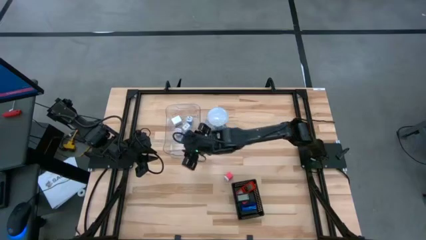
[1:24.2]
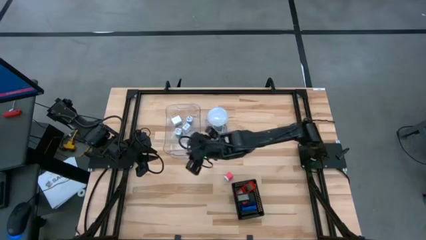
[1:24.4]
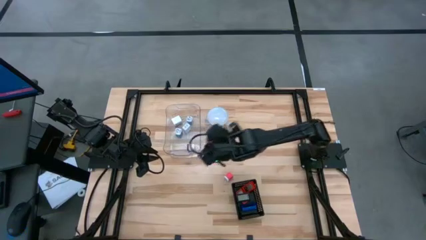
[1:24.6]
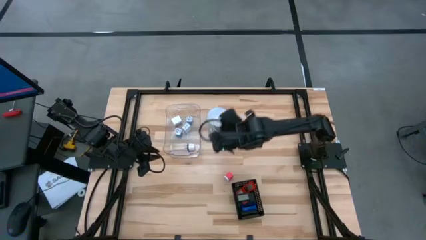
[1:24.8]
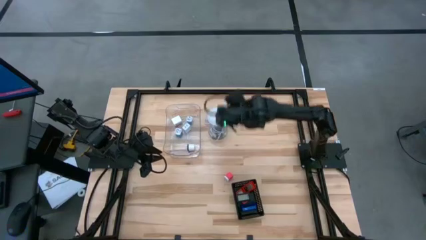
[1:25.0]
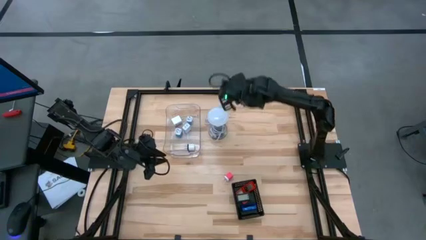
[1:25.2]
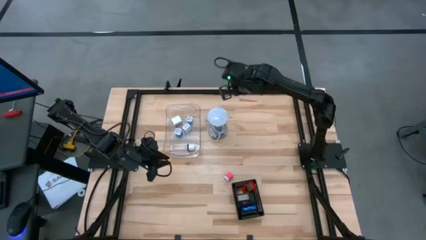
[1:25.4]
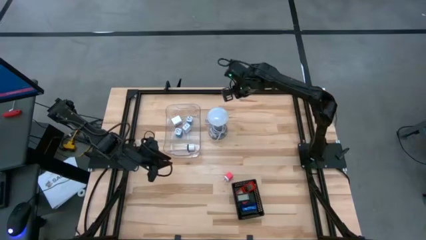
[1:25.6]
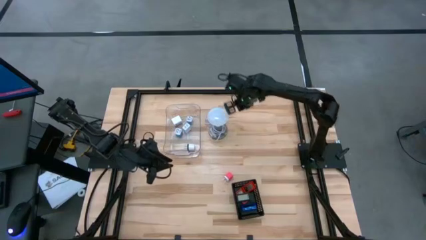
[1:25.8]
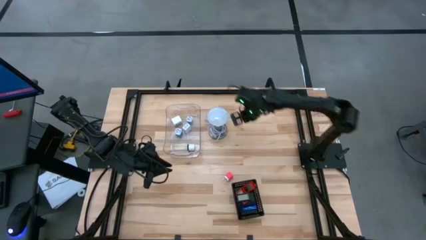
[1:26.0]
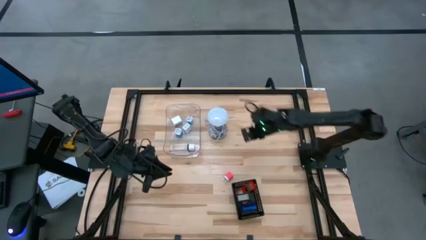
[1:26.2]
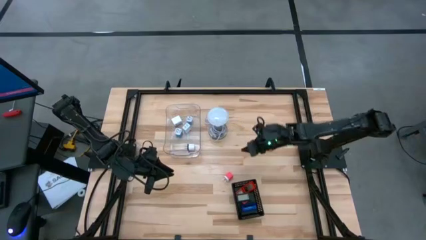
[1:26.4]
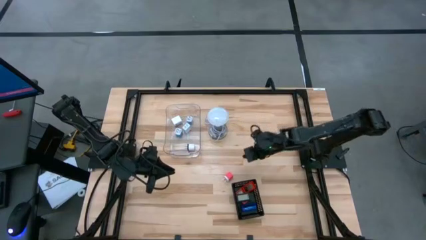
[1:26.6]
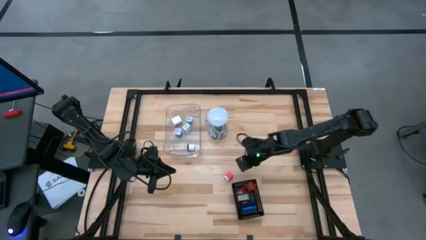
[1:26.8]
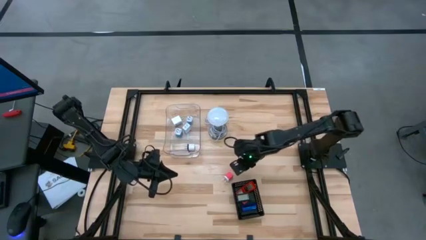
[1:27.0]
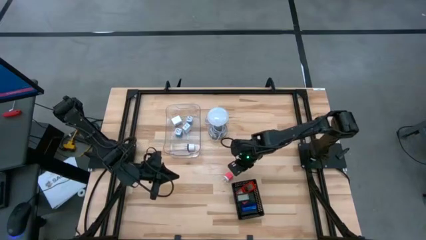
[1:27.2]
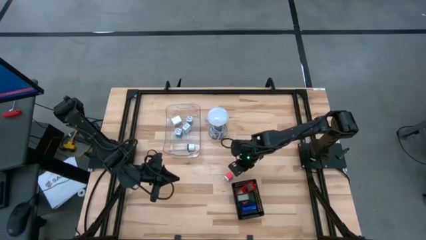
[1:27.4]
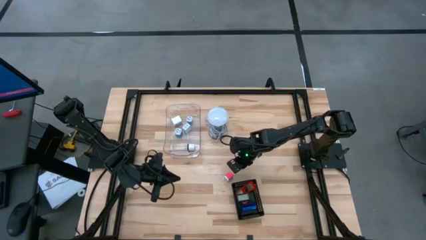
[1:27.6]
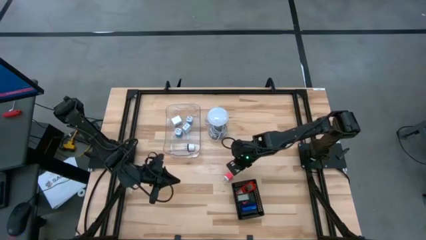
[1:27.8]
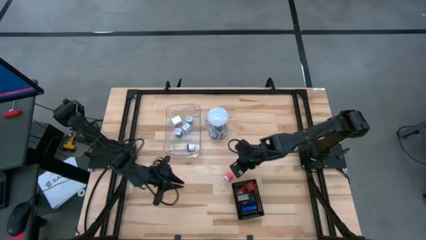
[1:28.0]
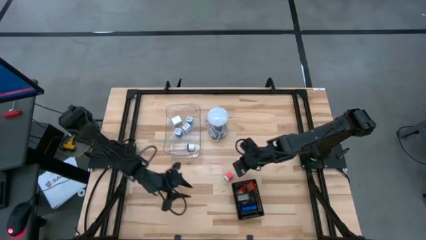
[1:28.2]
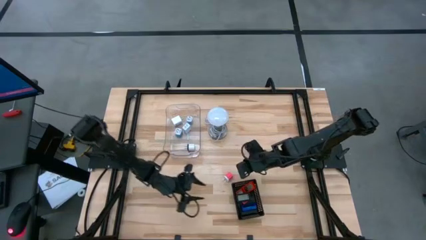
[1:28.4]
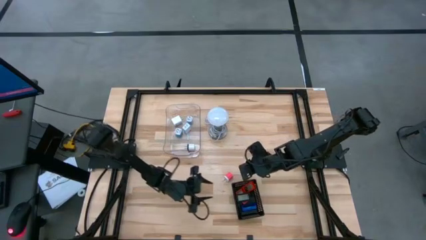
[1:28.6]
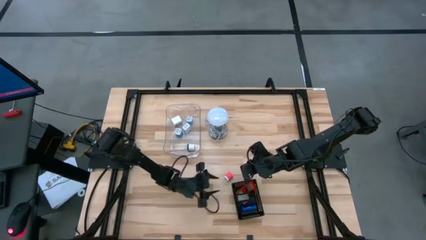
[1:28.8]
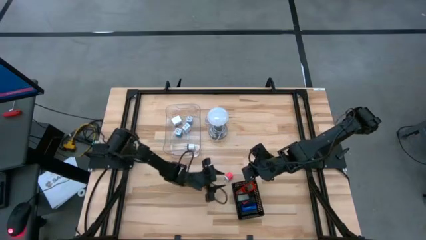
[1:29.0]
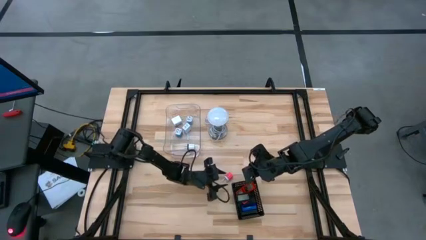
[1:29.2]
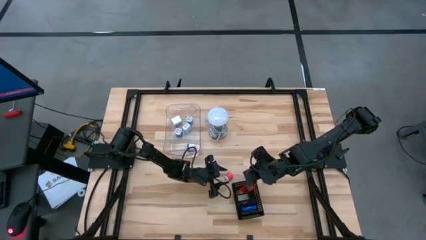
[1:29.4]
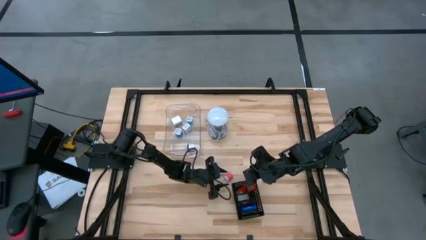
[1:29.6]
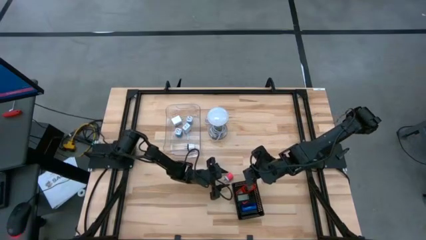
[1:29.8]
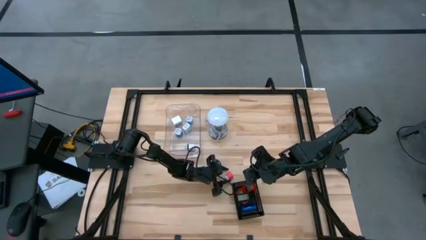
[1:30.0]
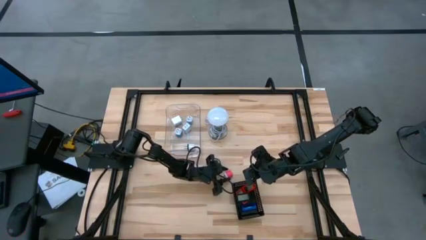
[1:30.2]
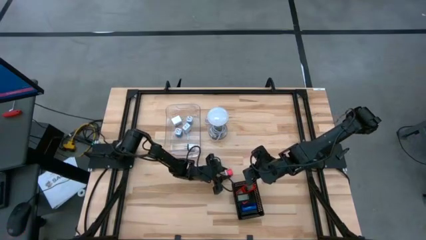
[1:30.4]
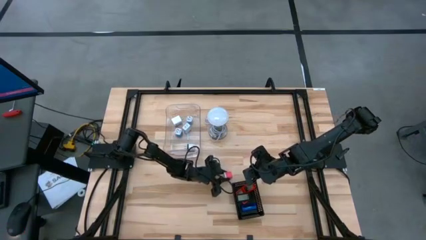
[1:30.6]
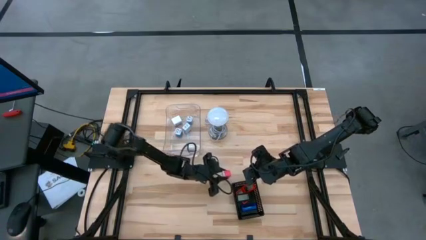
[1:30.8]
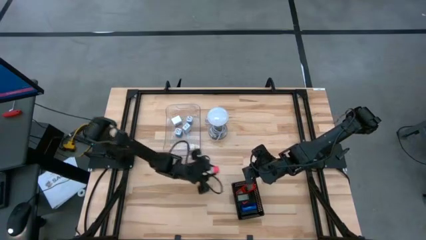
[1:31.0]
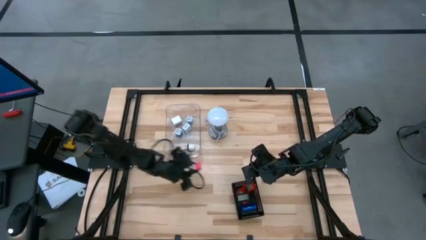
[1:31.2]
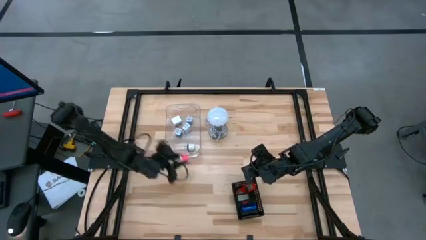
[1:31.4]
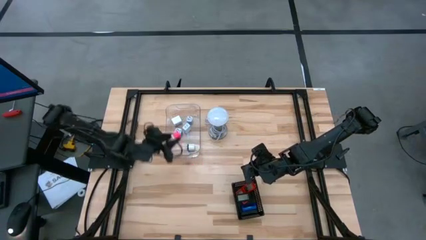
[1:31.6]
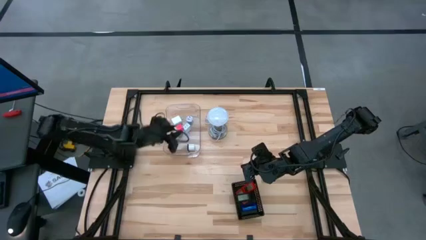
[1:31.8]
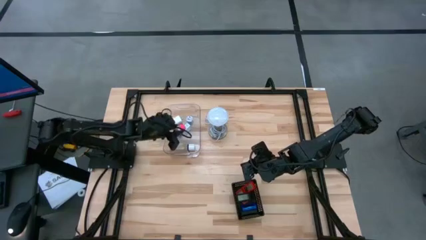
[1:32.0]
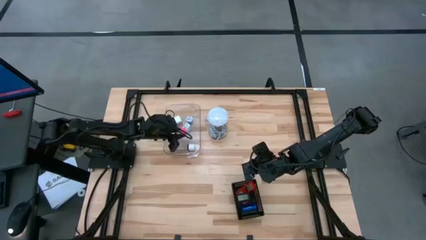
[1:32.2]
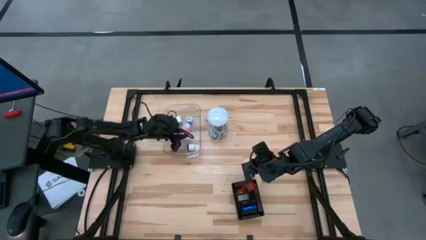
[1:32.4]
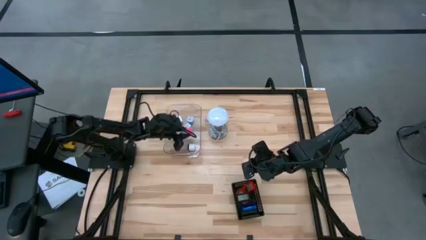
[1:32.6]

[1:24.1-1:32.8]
Task: Pick & Place Office items
Put the pink charger adapter into the transparent bin

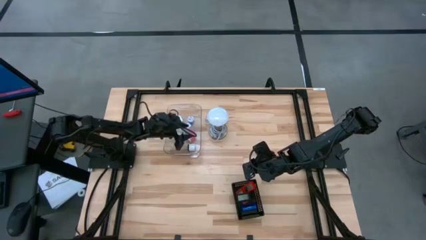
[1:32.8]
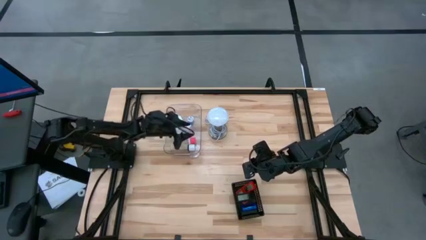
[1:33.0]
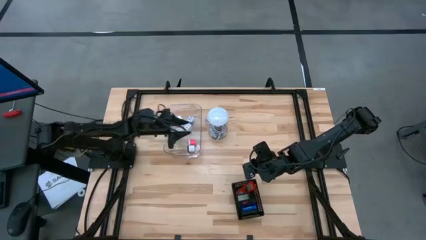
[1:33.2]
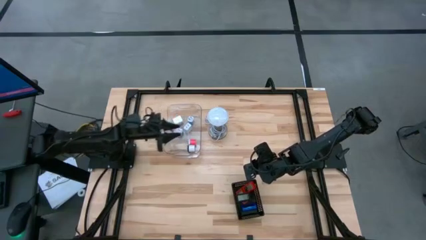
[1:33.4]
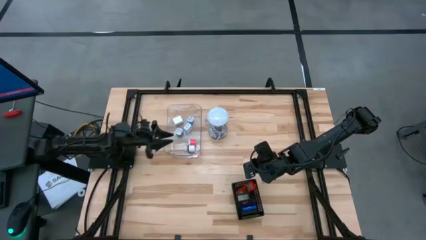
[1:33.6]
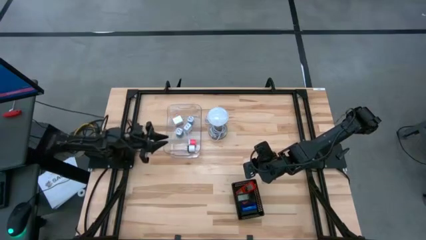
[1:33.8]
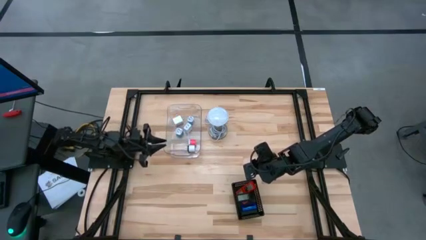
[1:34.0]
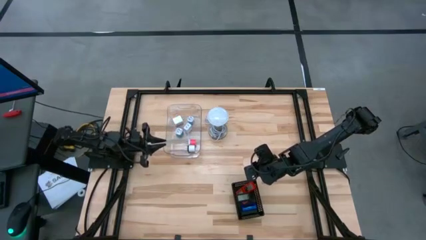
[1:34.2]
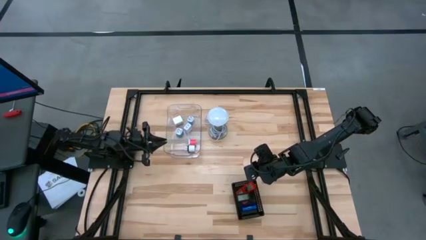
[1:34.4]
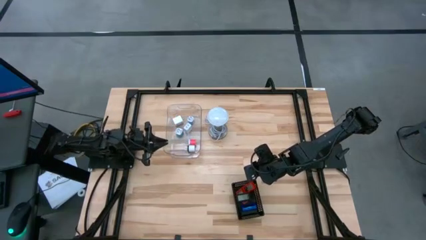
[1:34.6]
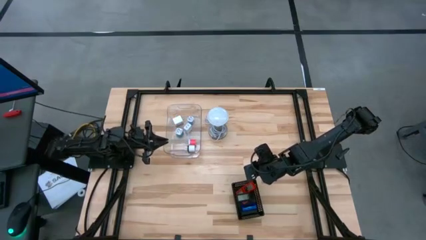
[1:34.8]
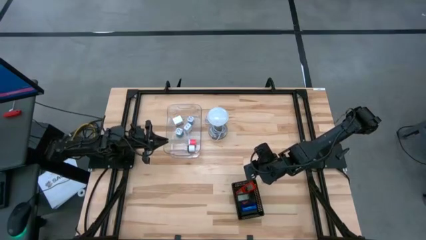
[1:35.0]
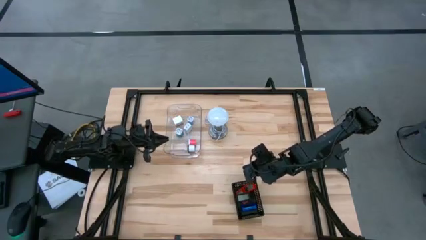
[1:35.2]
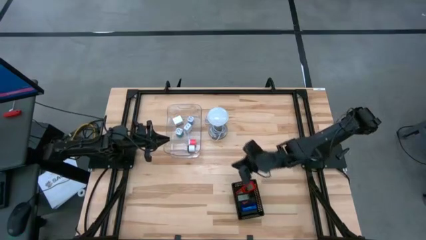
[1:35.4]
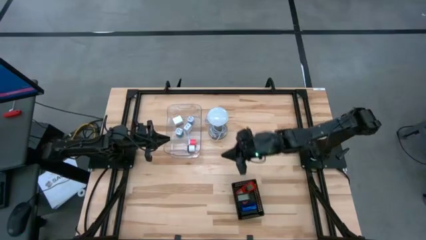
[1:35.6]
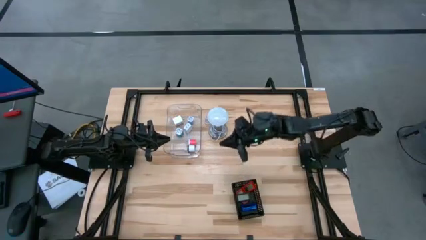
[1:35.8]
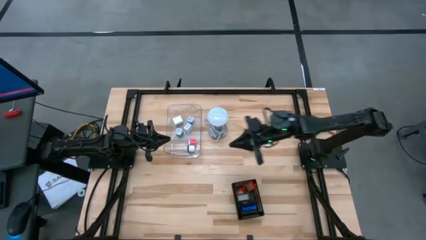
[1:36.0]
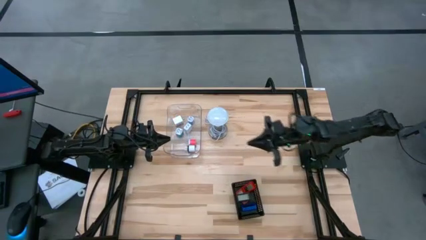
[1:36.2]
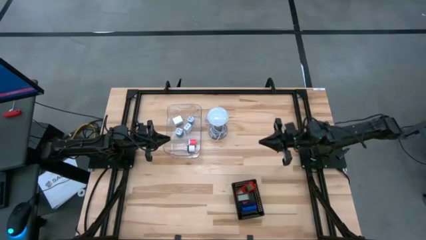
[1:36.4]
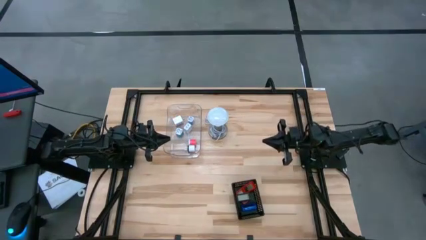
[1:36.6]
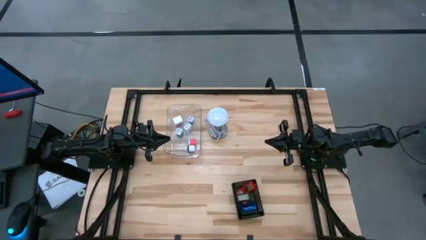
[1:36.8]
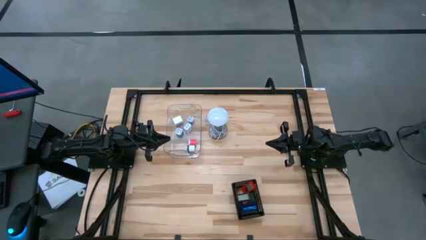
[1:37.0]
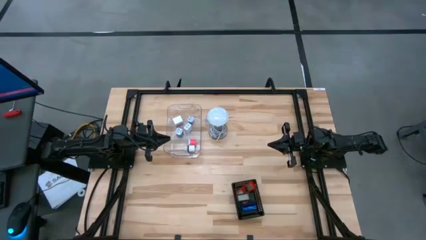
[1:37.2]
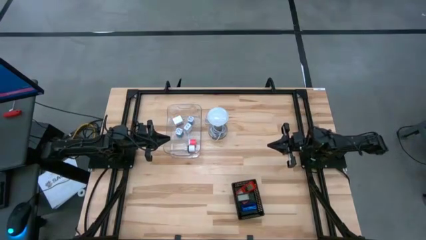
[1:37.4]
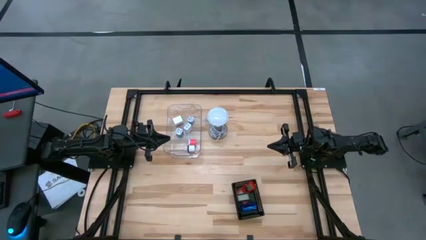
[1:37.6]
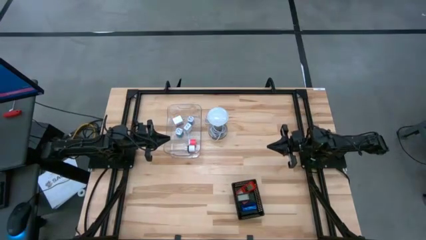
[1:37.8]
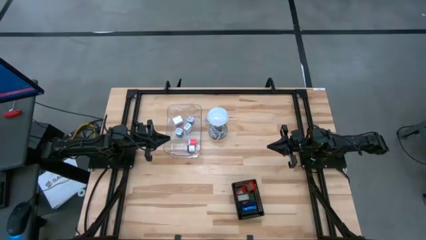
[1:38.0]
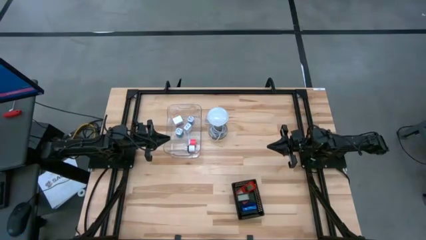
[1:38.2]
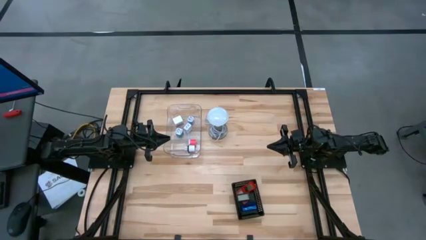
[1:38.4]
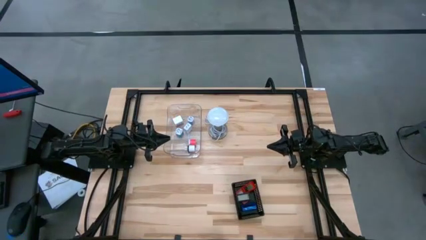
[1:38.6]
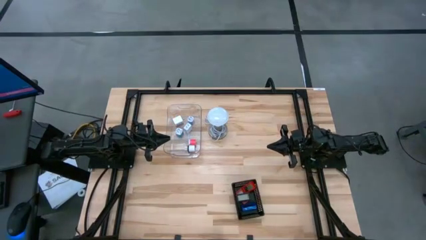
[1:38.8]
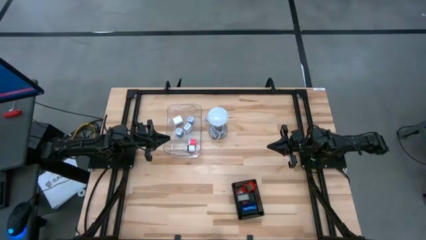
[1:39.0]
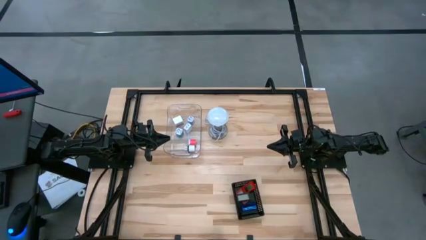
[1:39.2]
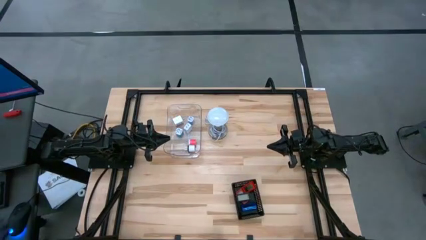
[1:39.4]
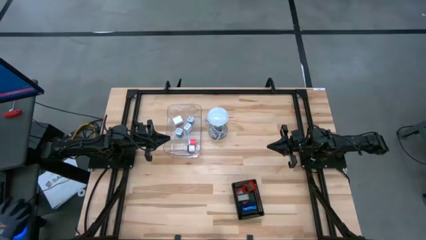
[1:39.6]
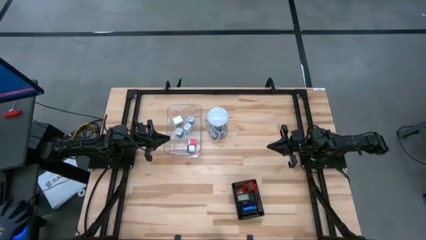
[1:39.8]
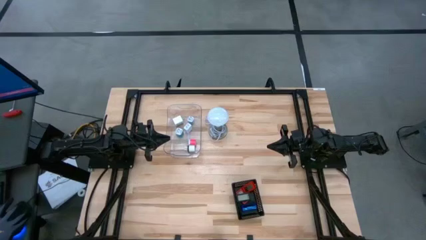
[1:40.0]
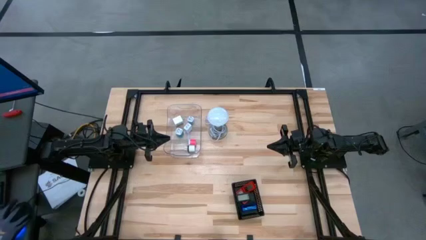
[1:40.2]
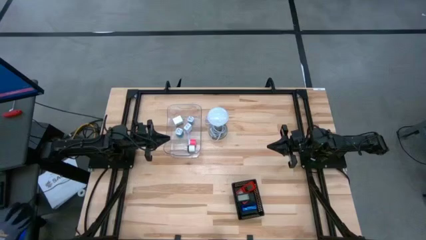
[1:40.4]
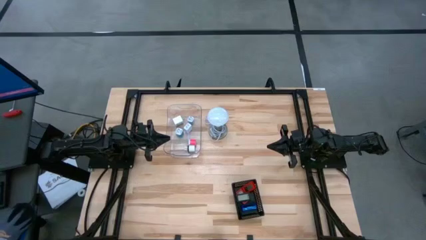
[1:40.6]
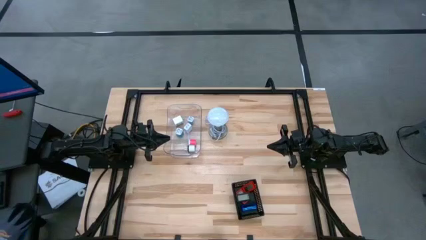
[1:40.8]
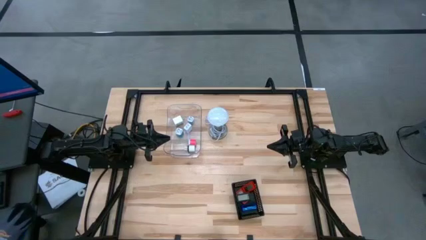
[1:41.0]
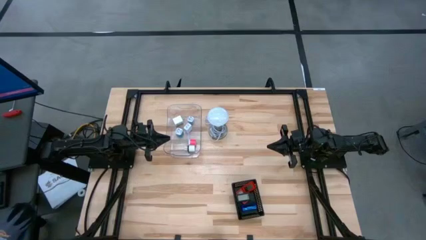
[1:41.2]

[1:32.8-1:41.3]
Return to Home Position
